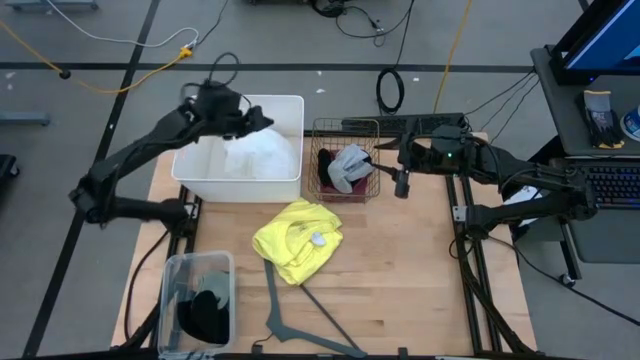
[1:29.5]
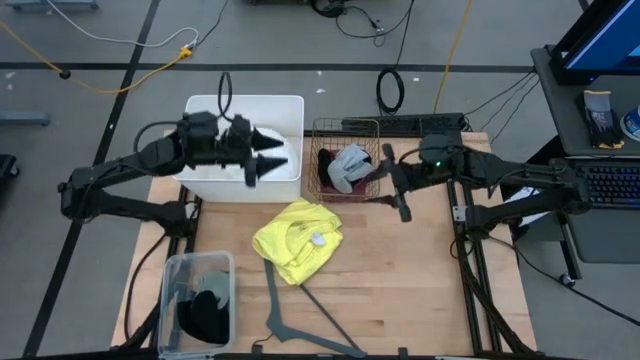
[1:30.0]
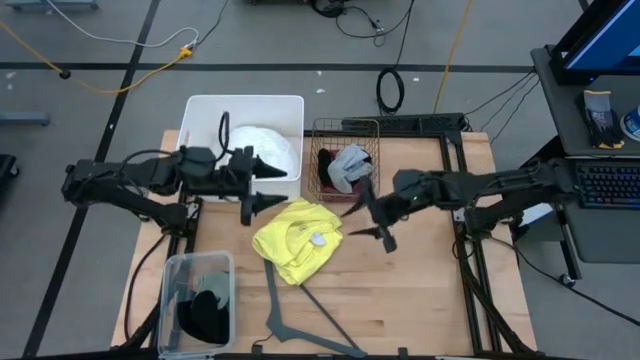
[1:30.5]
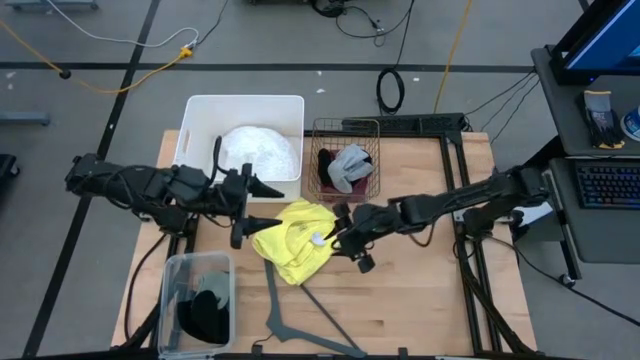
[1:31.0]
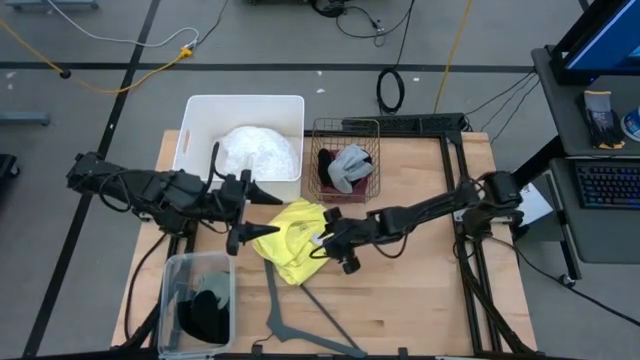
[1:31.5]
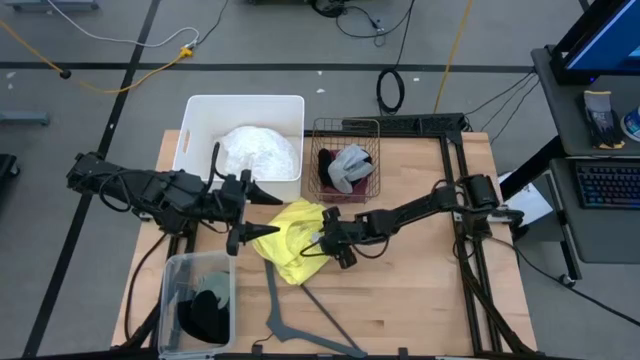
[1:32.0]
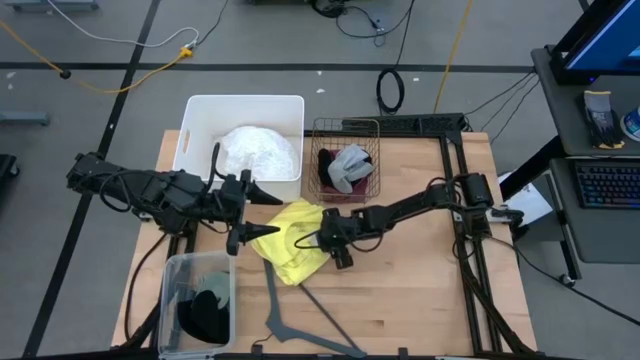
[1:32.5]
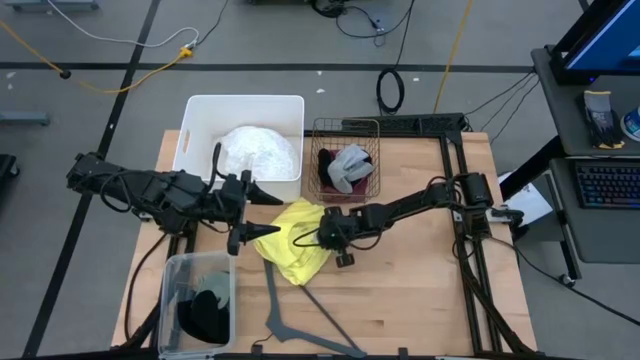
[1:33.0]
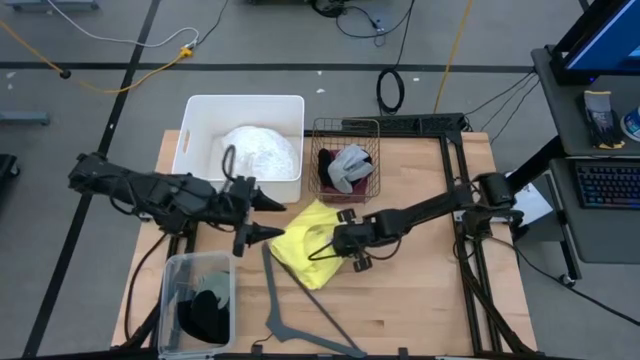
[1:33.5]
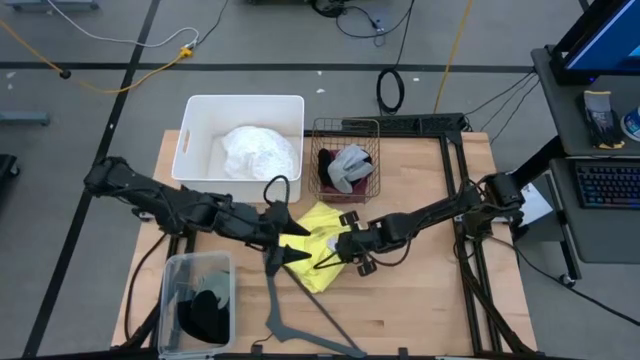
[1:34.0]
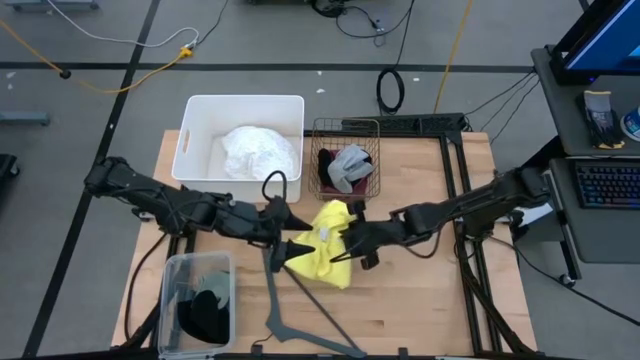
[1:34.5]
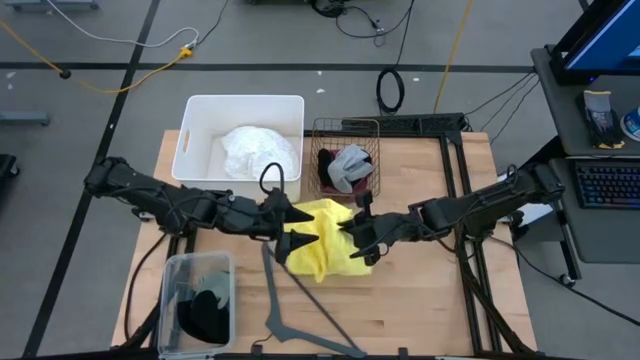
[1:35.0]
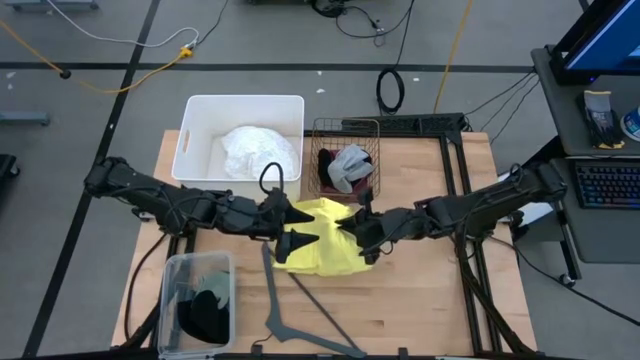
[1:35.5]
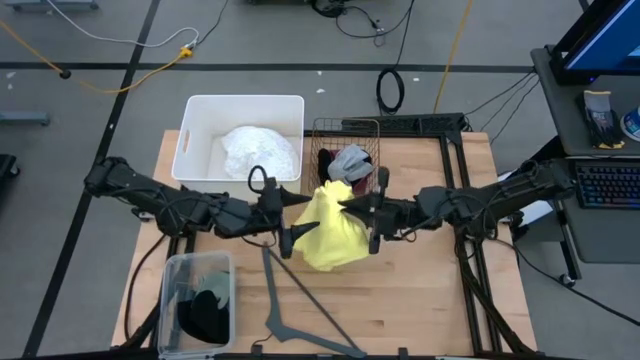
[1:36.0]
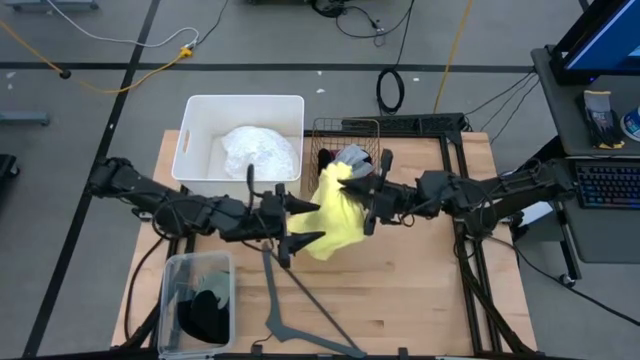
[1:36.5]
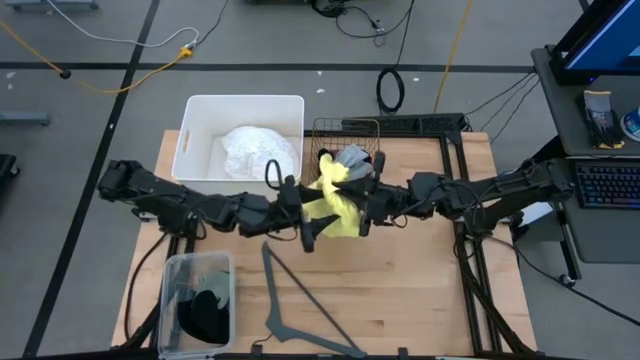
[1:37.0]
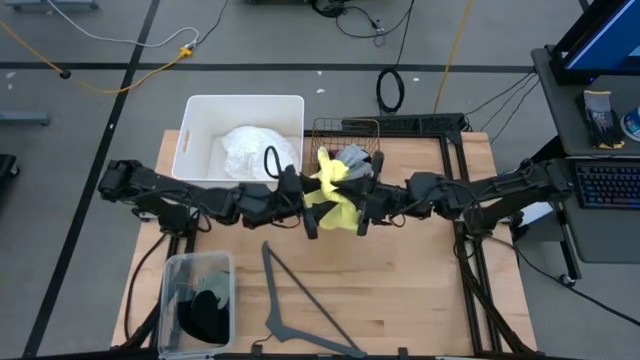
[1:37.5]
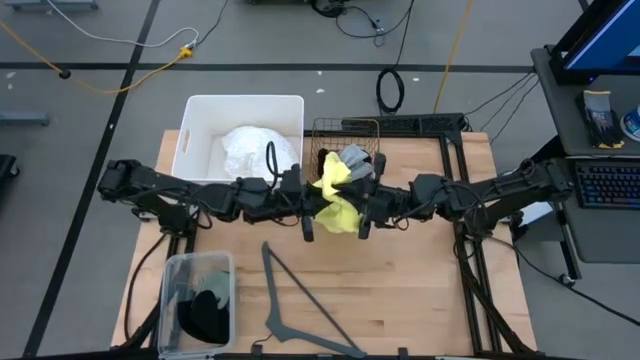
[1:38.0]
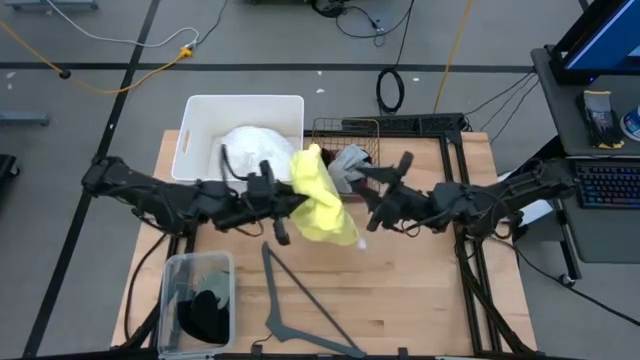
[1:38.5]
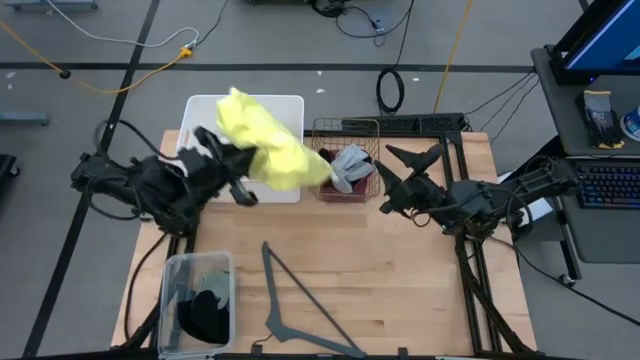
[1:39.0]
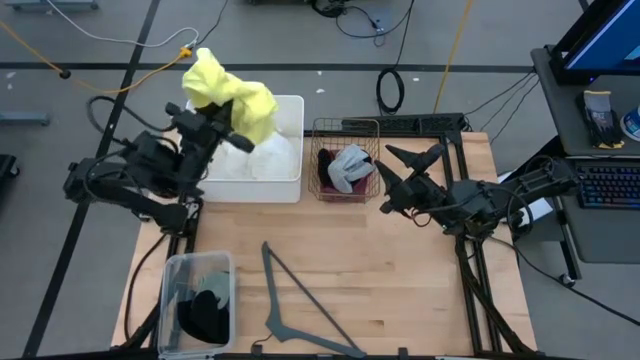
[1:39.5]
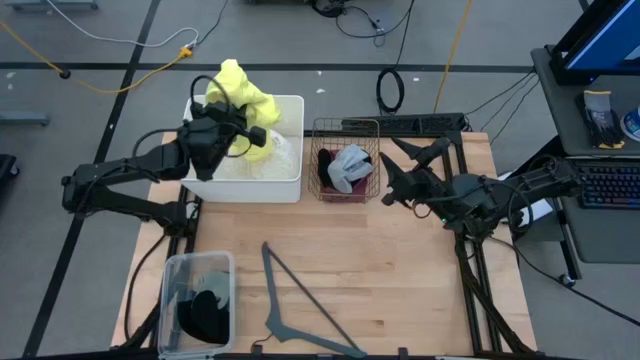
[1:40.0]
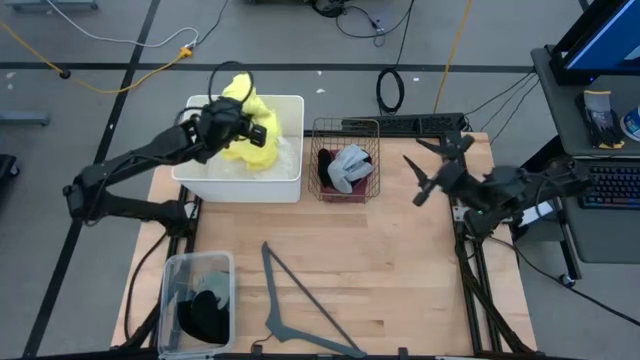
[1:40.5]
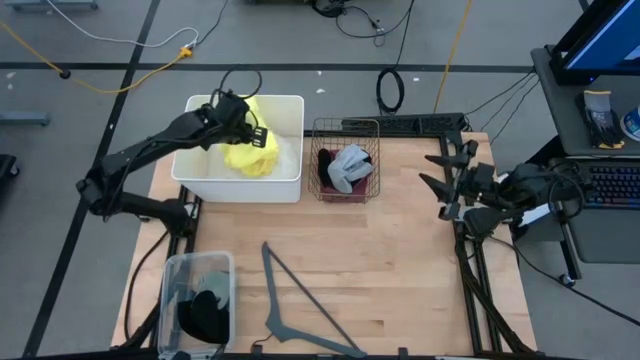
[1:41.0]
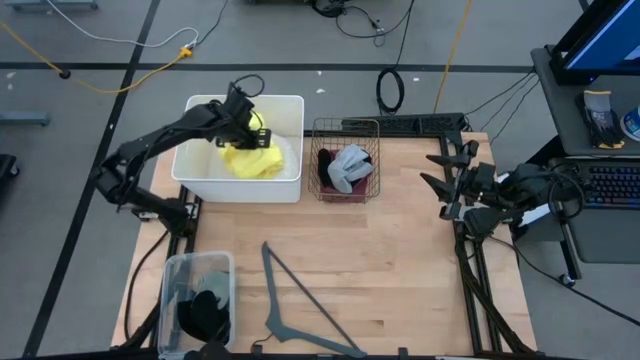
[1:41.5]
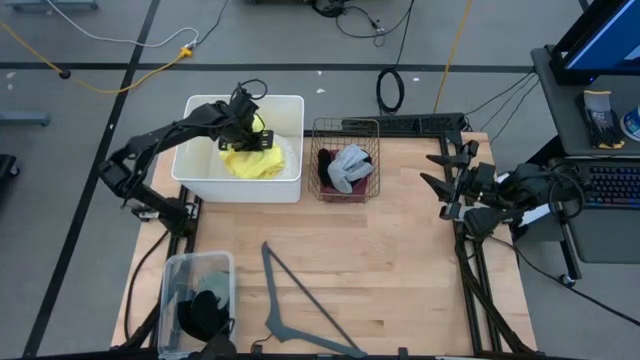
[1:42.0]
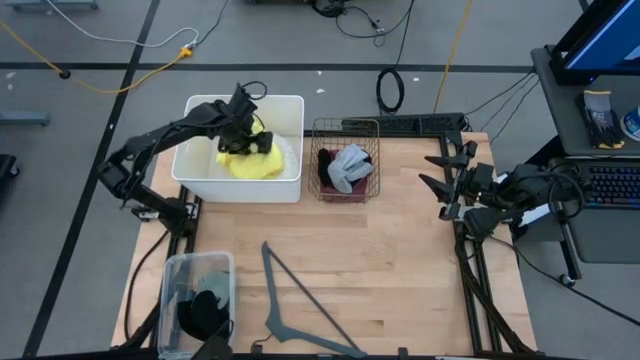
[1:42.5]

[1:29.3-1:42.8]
Task: Pick & Place Cloths
Put the yellow shirt into the white bin

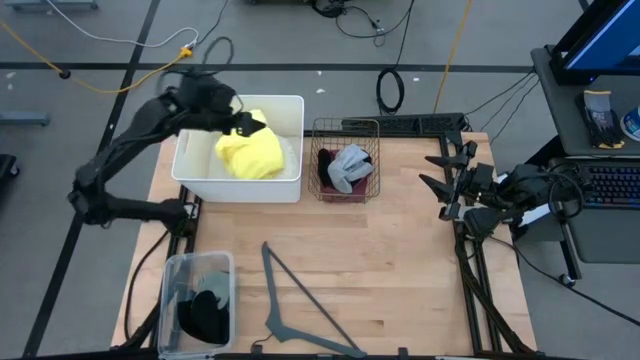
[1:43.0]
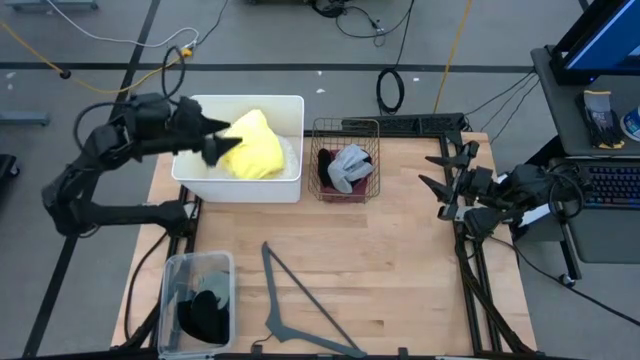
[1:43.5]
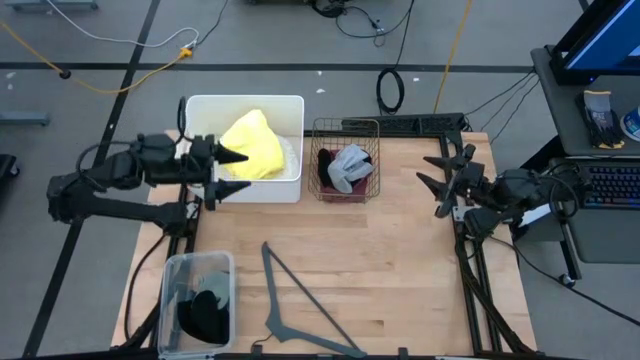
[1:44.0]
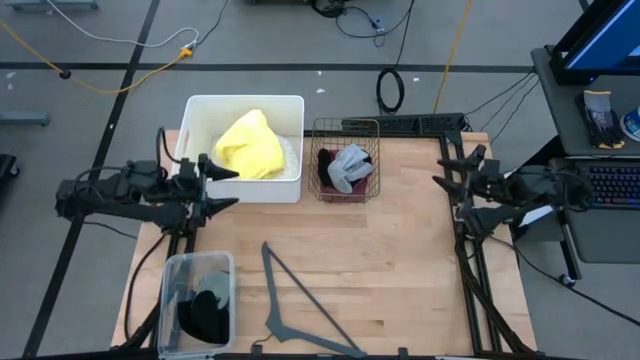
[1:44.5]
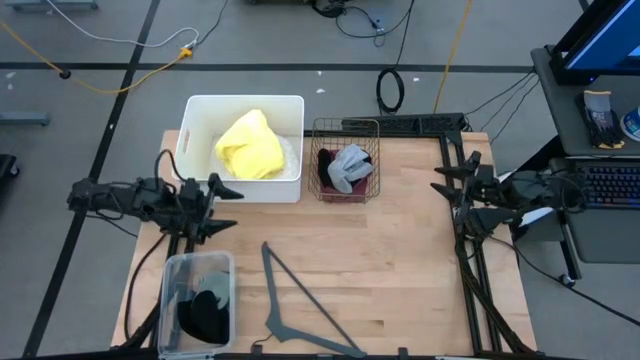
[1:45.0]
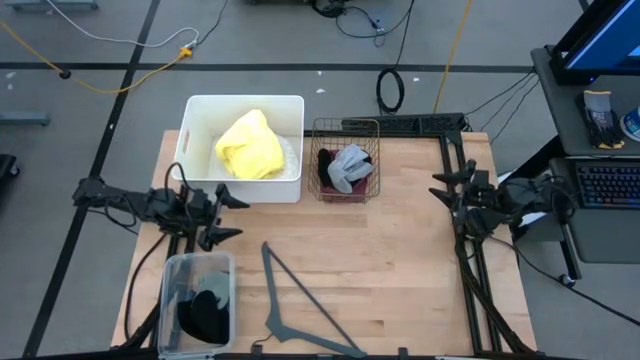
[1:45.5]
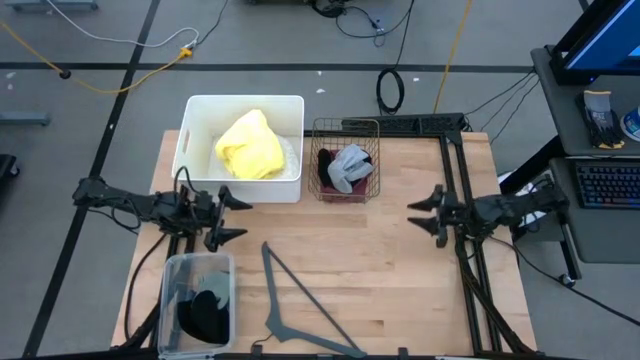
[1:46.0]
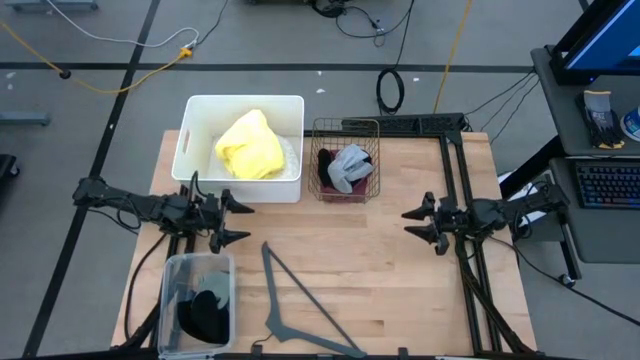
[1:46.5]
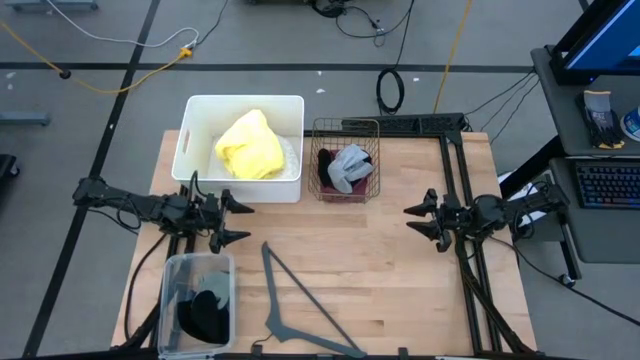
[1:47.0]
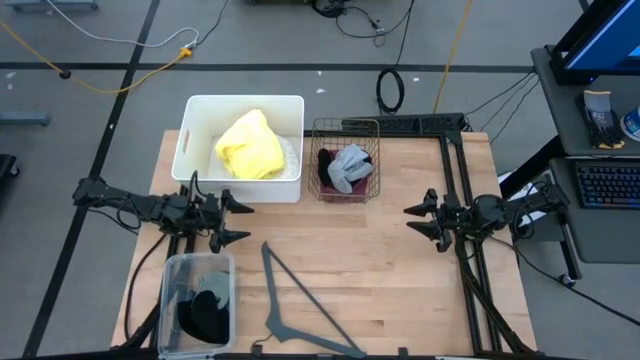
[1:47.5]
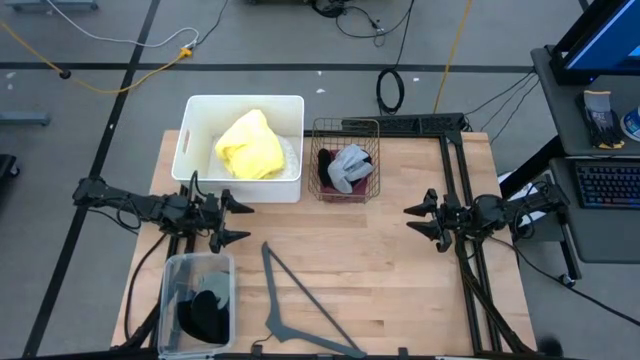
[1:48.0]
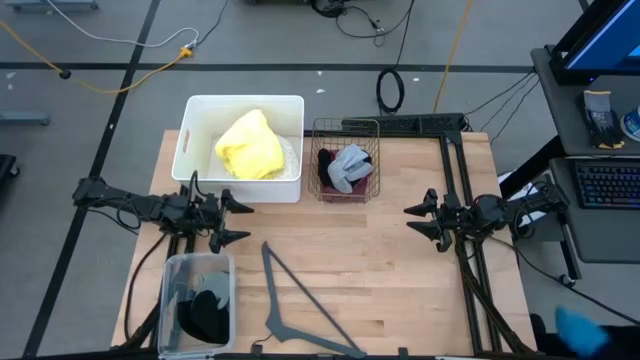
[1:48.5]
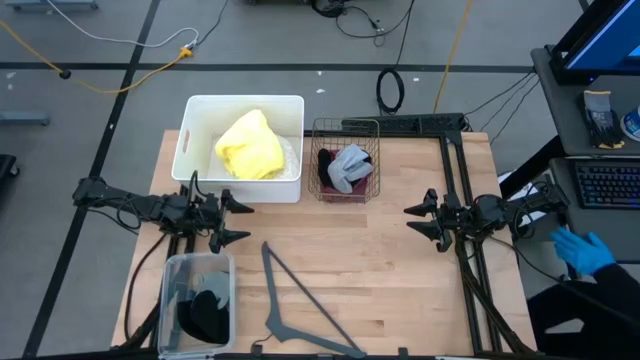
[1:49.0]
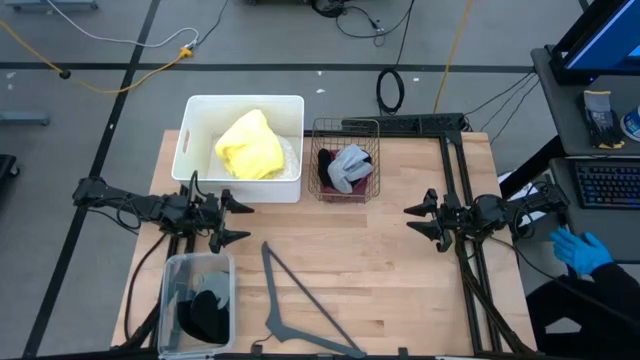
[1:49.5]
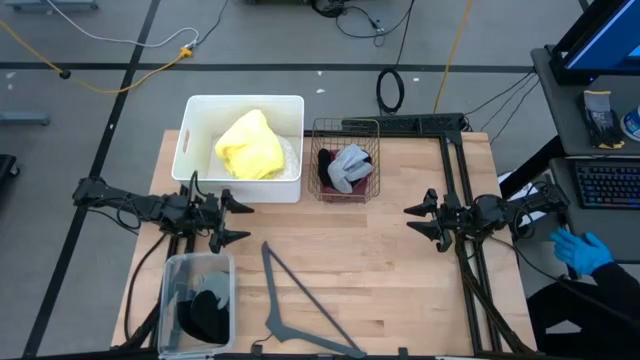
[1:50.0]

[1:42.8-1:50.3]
Return to Home Position
